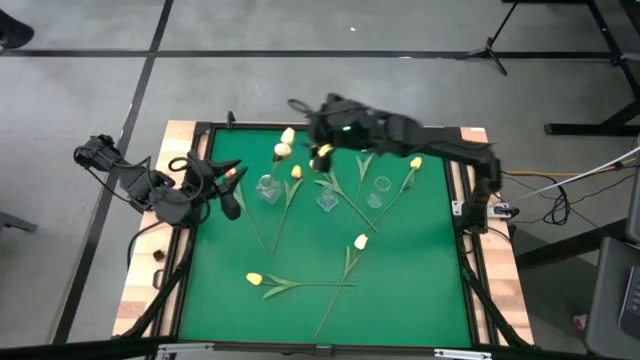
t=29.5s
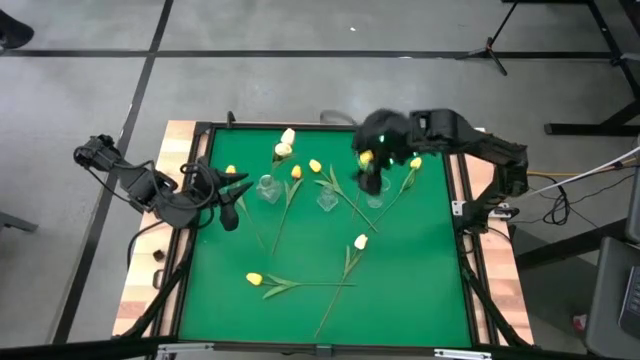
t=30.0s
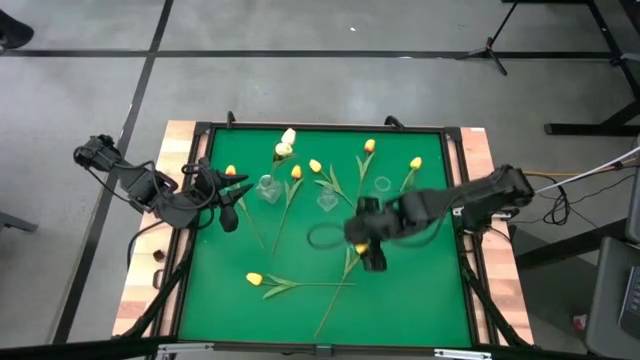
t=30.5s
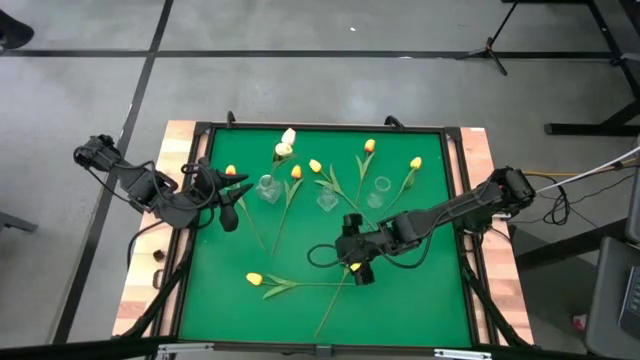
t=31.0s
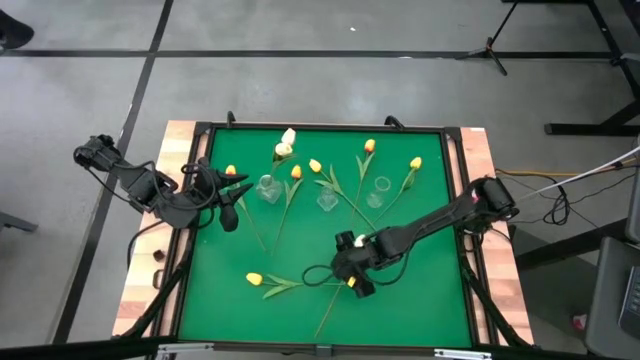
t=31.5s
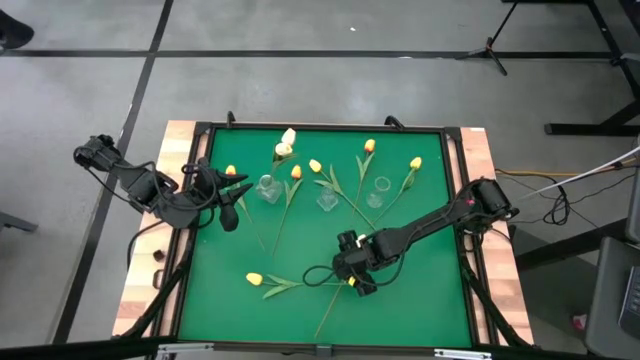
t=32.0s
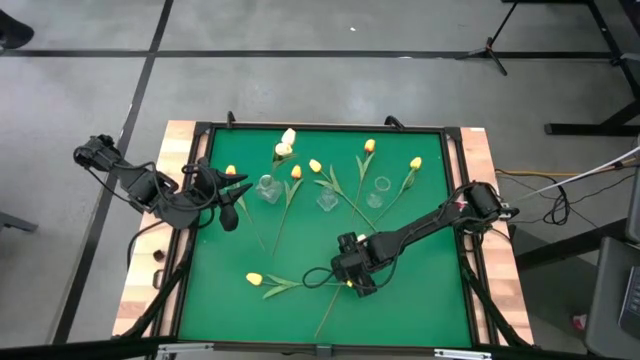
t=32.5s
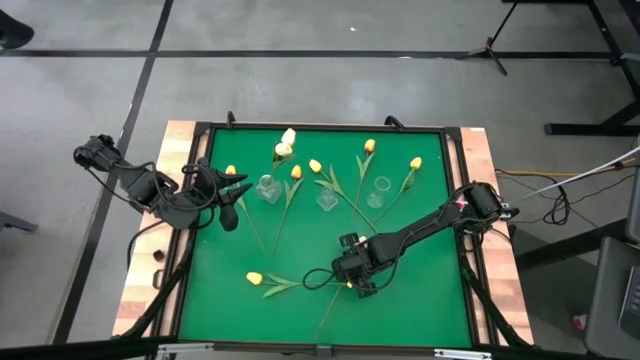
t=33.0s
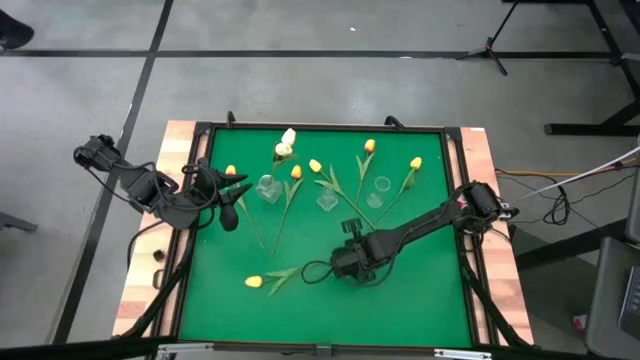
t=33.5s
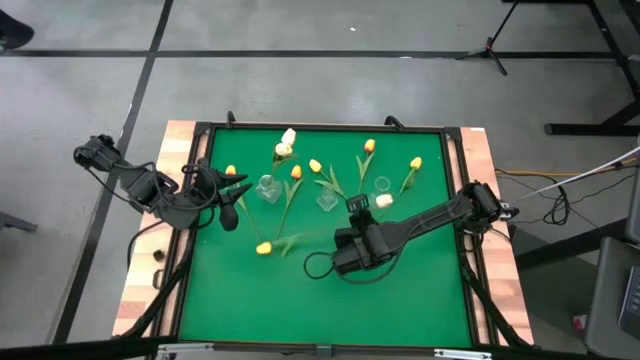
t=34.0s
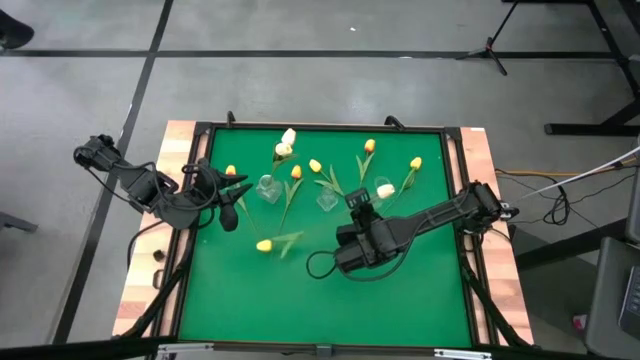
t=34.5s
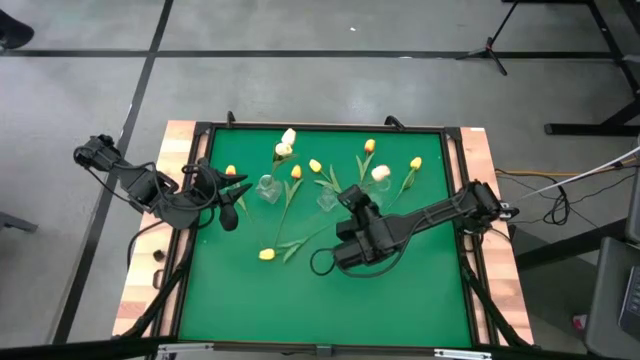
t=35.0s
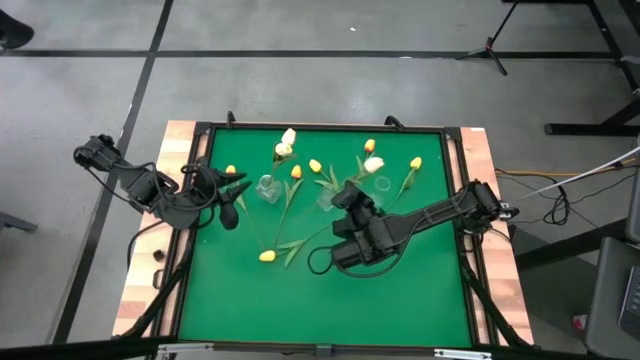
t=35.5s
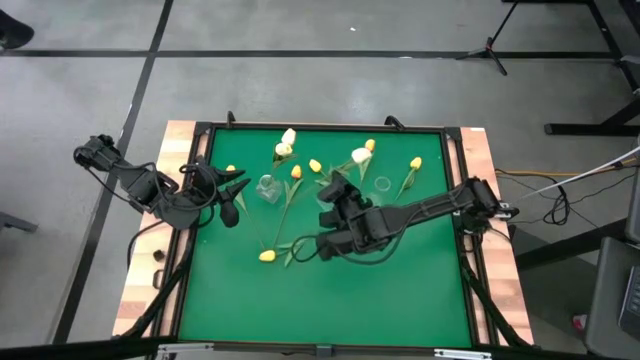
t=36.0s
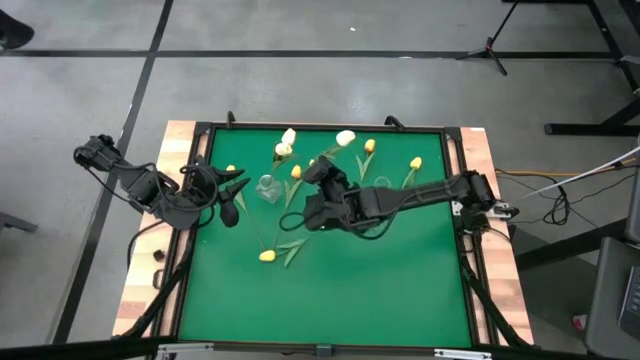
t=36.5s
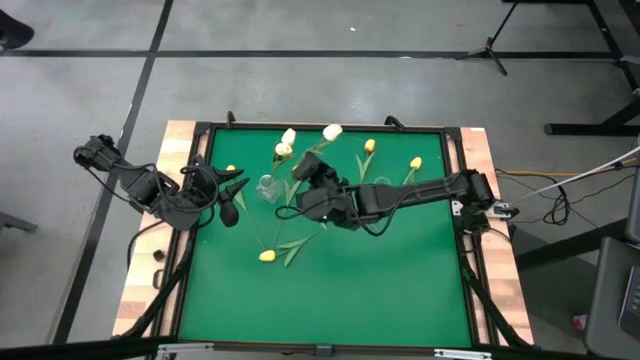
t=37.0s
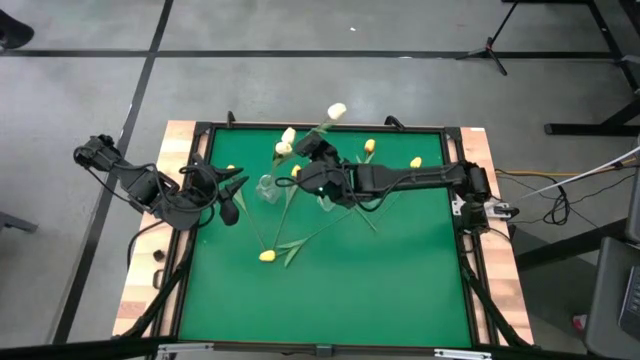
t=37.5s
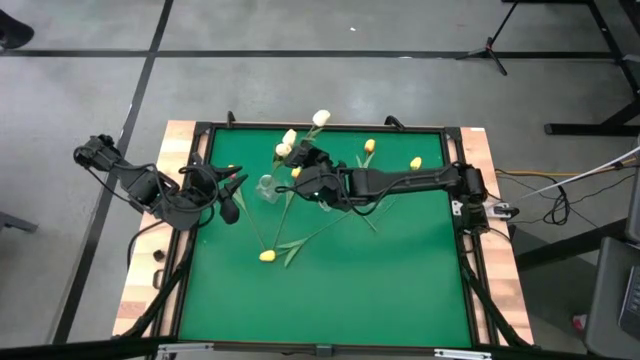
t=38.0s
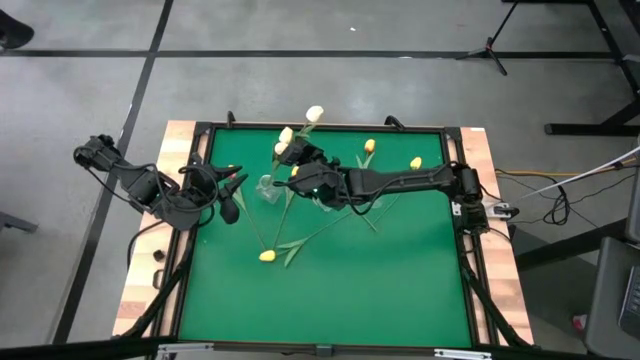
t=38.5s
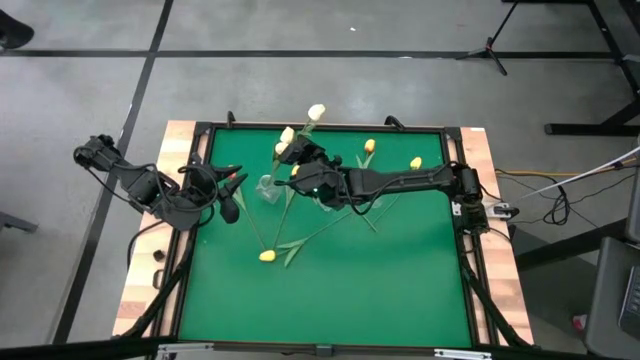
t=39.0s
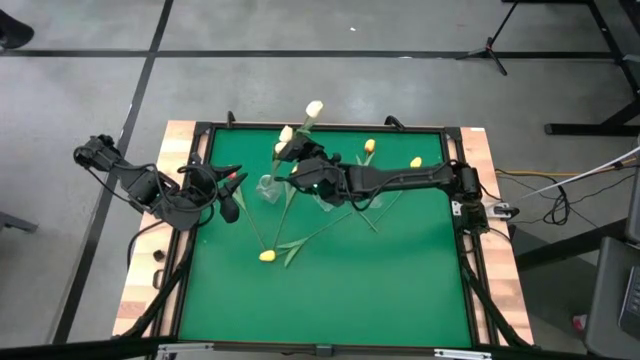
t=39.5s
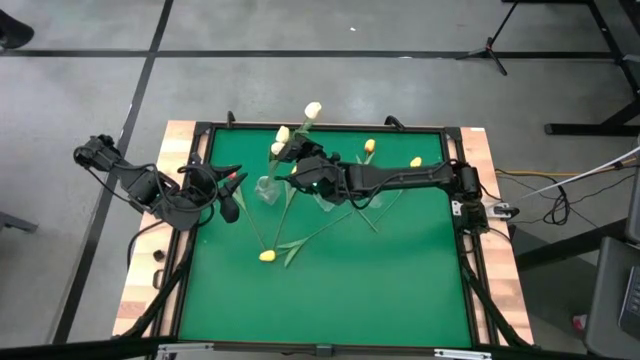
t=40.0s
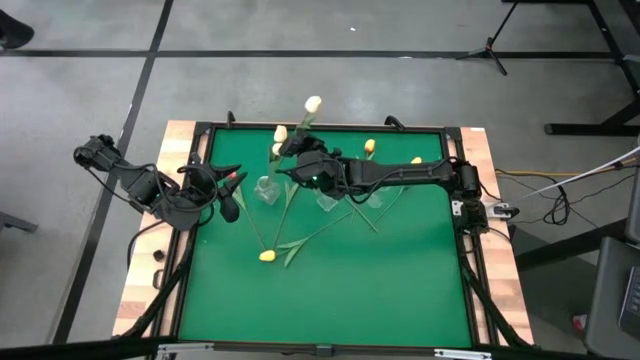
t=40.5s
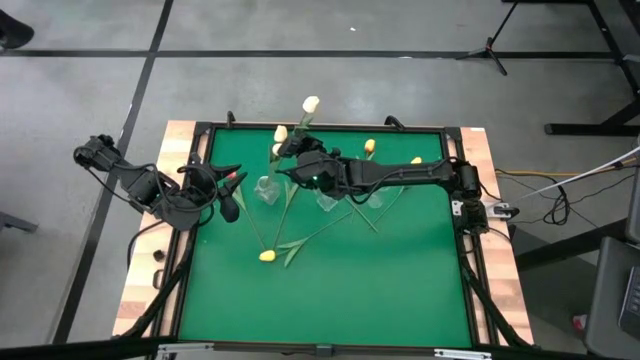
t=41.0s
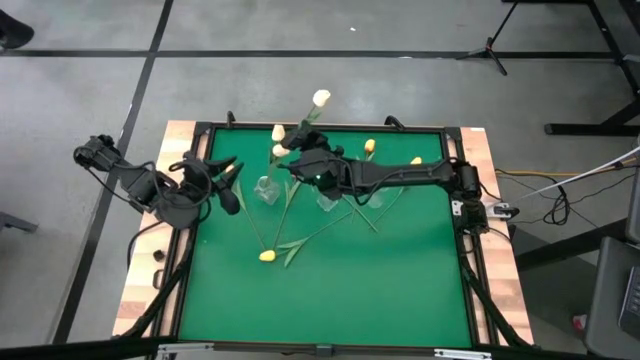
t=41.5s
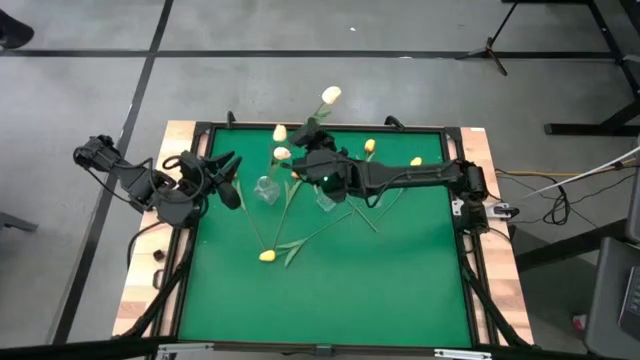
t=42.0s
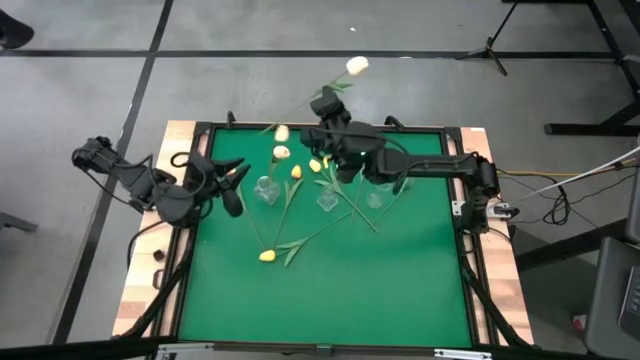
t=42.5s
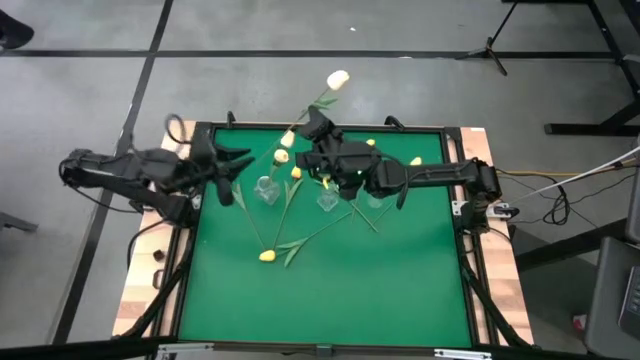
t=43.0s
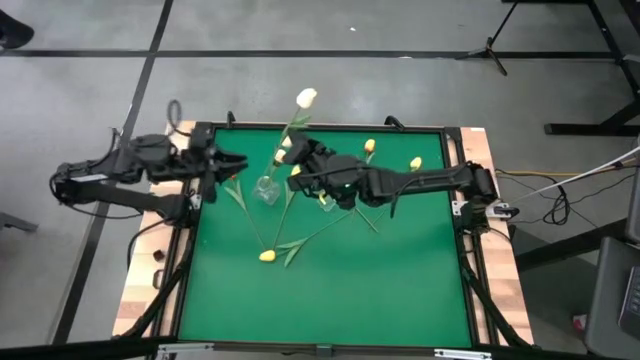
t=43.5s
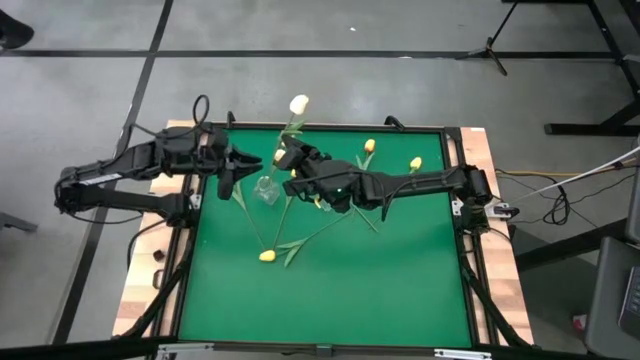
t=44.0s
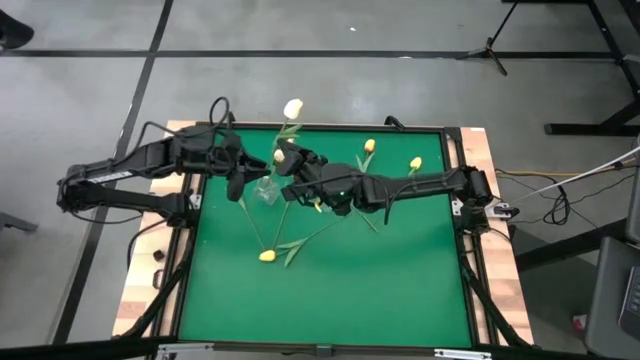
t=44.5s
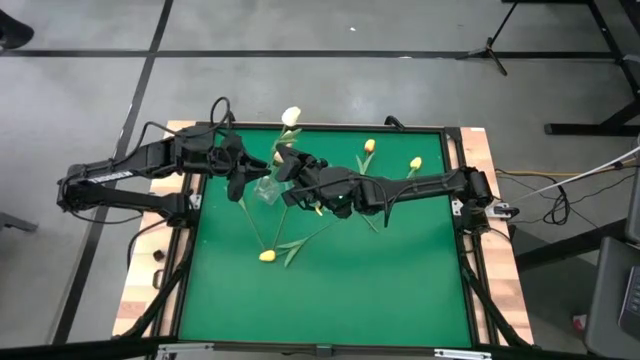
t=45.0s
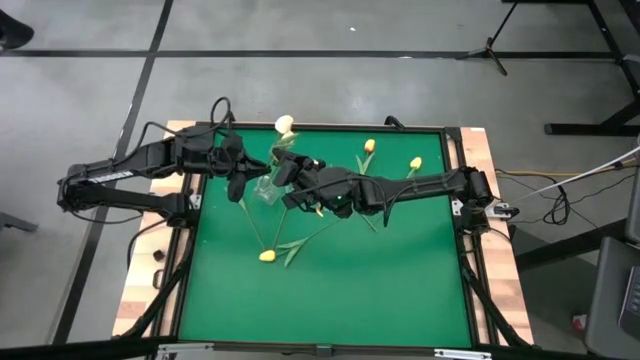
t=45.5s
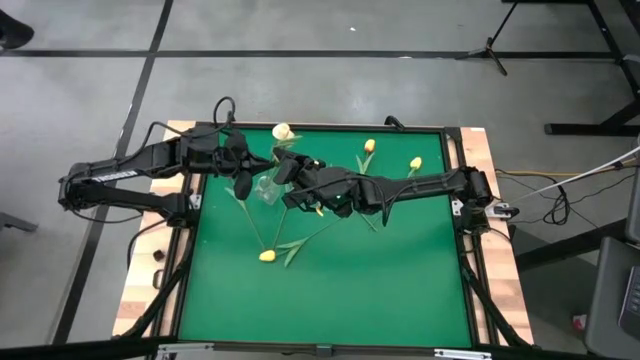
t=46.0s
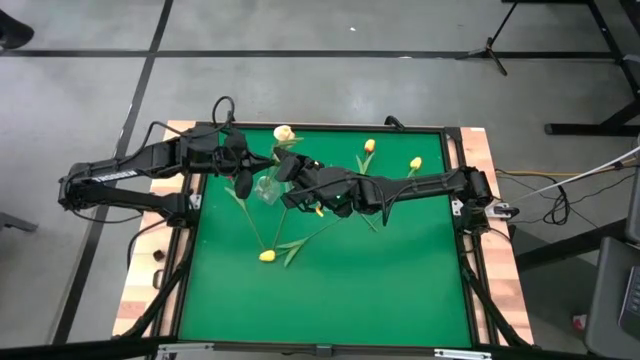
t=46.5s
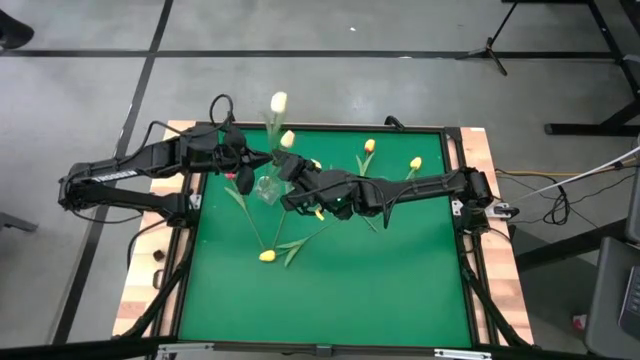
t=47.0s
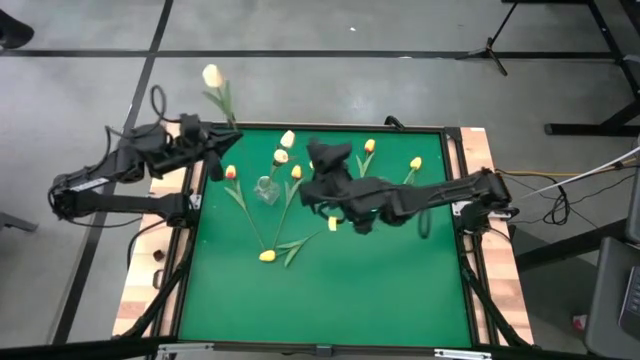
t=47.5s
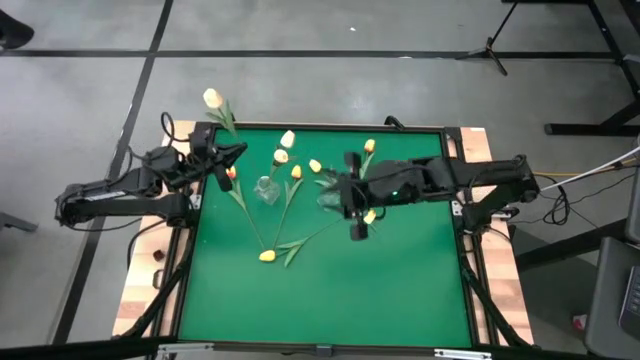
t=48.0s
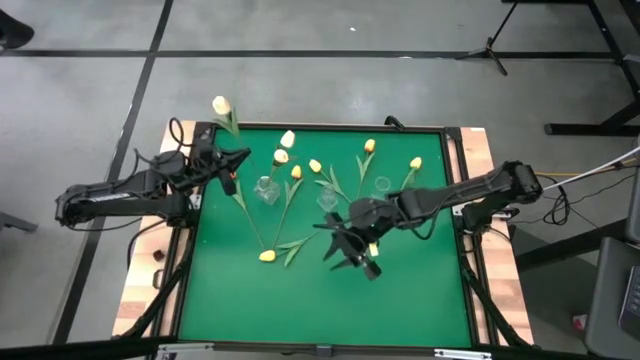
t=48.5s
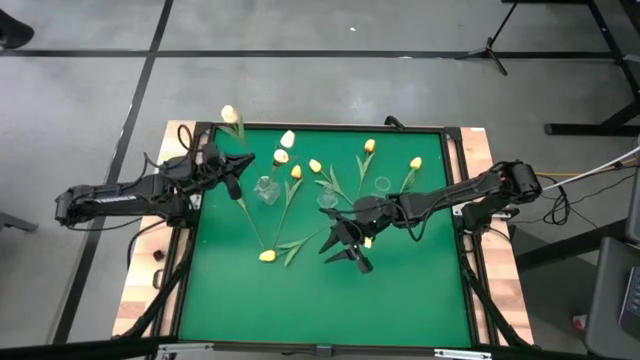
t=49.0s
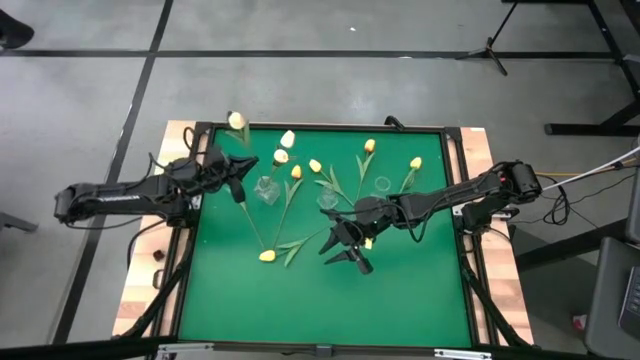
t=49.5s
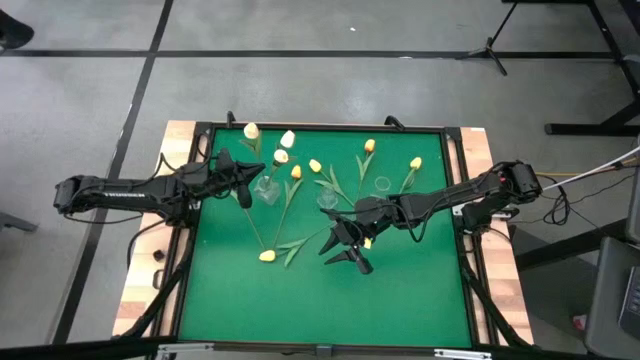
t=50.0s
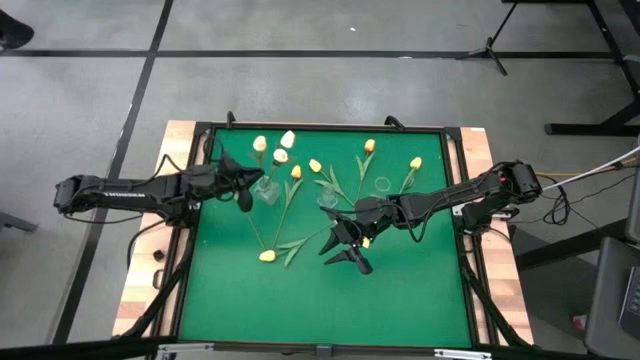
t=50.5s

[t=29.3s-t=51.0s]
Task: Sort flowers into vase by color
Put the light yellow flower into the left transparent vase

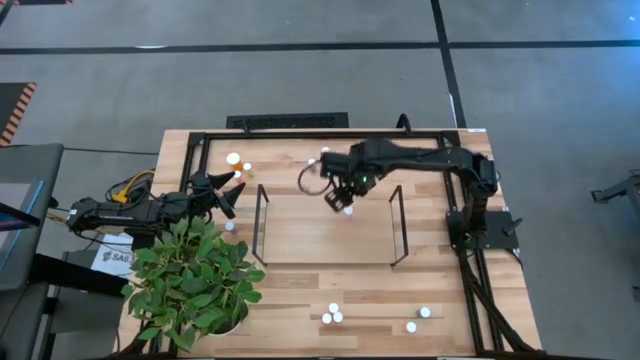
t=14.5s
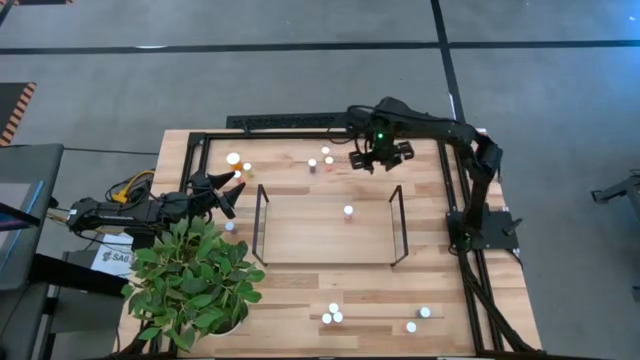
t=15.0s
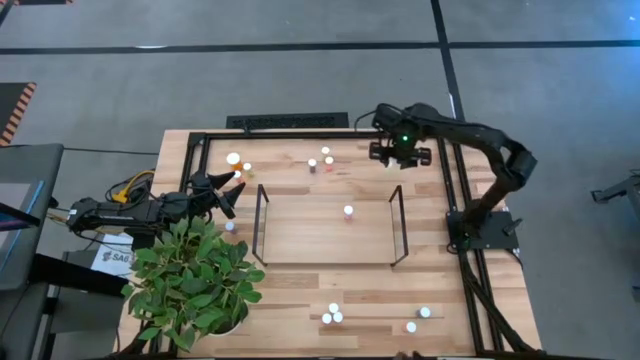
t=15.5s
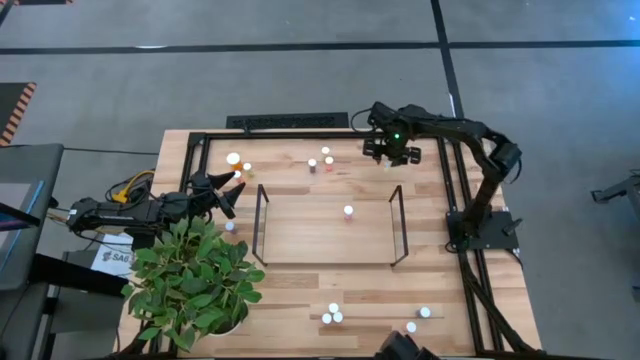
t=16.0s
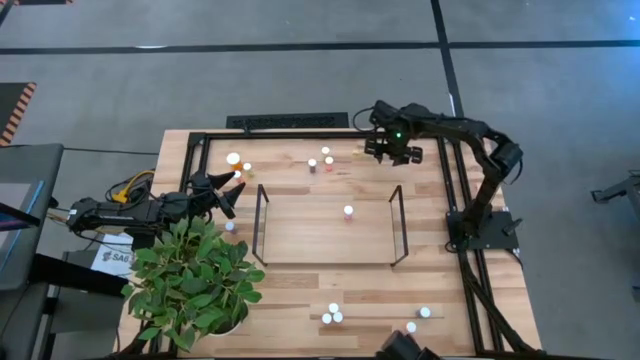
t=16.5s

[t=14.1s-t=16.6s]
Task: Pick and place medicine bottles onto shelf by color
Put the yellow pill bottle on the shelf
